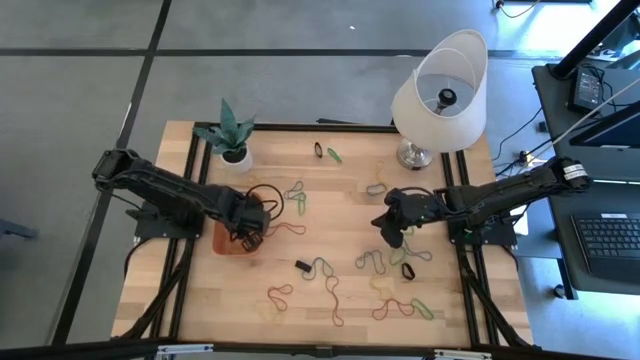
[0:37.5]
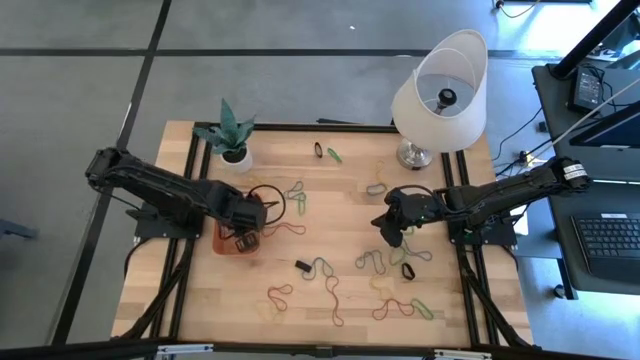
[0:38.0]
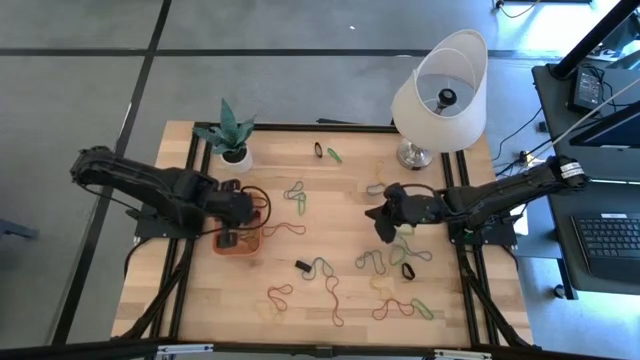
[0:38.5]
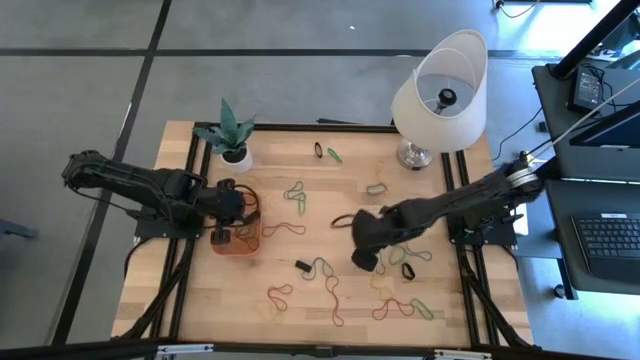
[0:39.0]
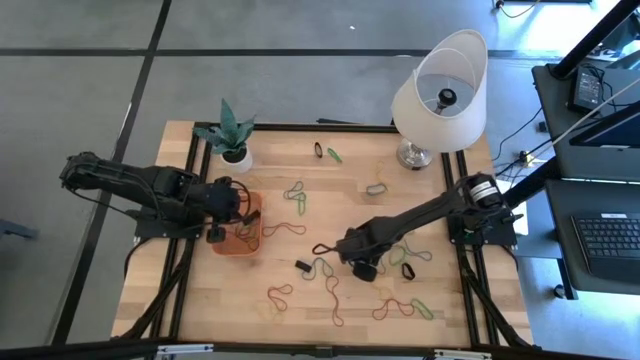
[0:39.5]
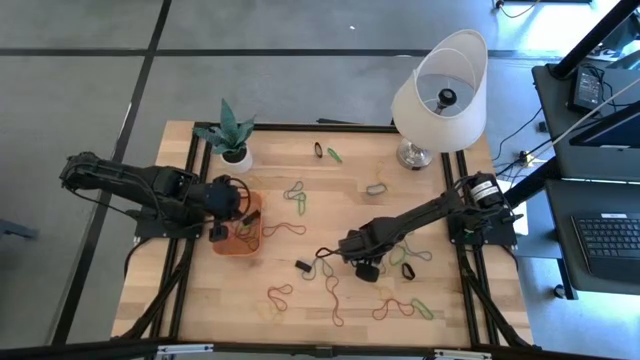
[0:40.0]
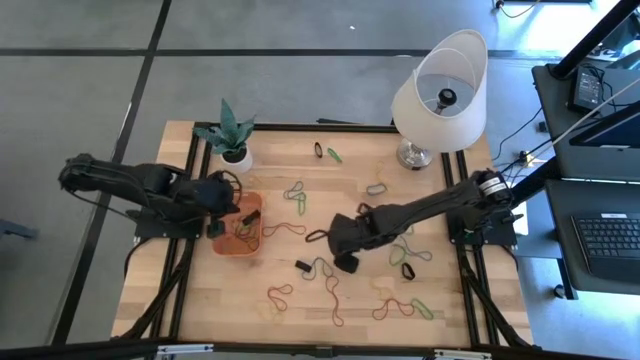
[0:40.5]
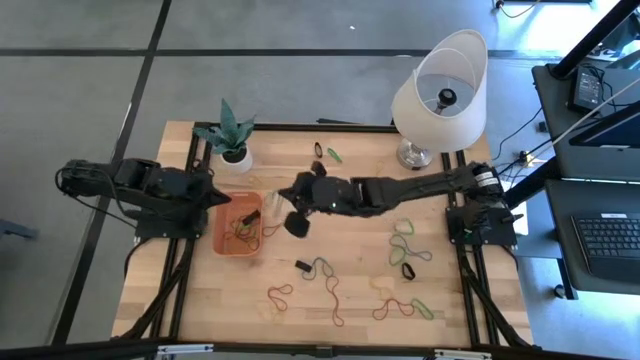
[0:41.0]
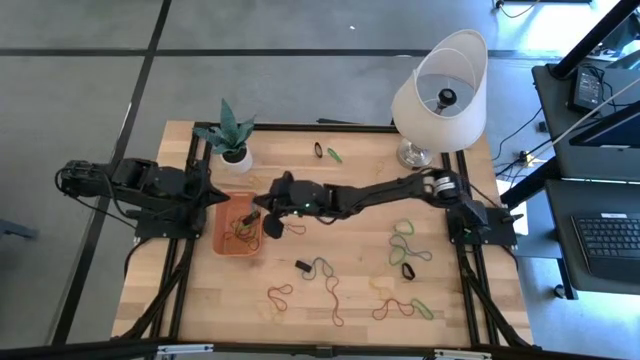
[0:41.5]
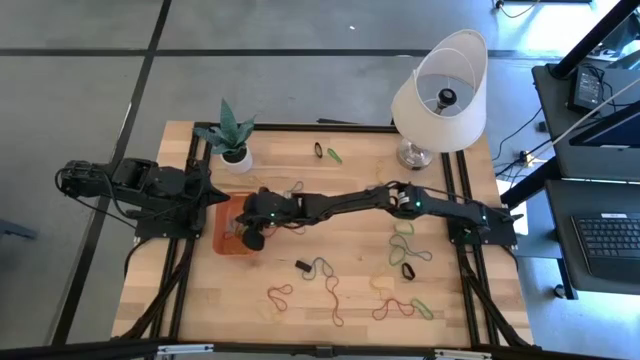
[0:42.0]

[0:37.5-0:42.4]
Task: Pick and place rubber bands into bin
Put the blue rubber band into the orange bin

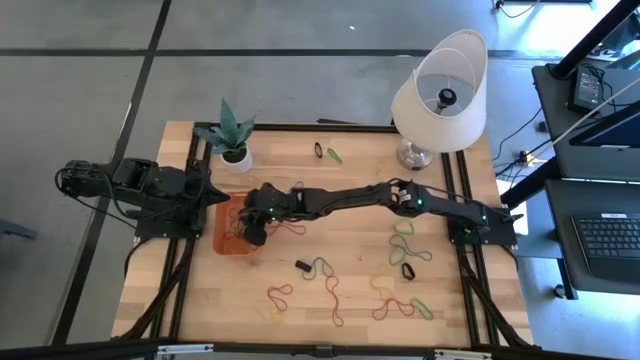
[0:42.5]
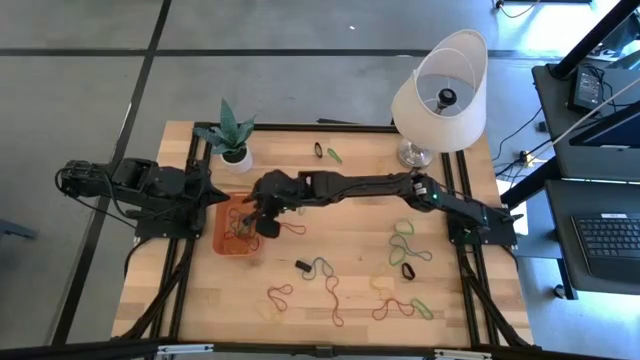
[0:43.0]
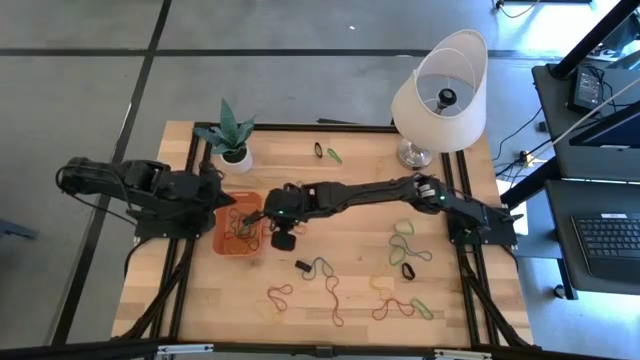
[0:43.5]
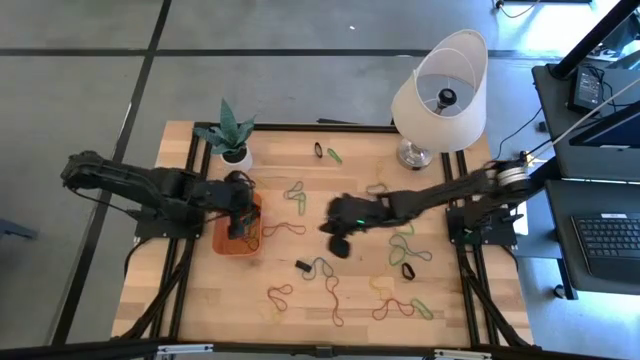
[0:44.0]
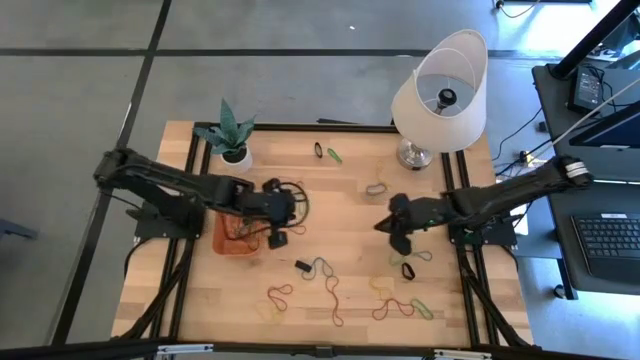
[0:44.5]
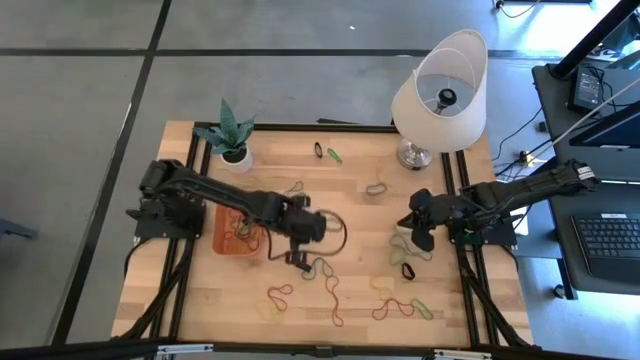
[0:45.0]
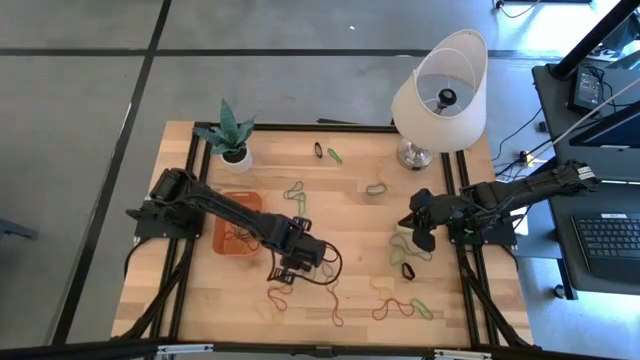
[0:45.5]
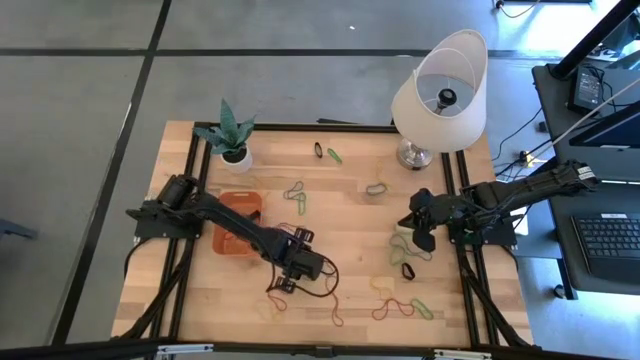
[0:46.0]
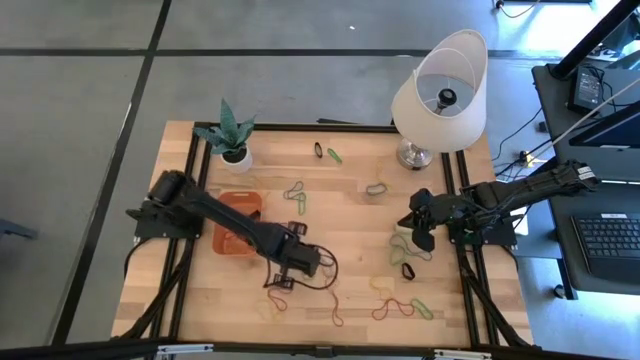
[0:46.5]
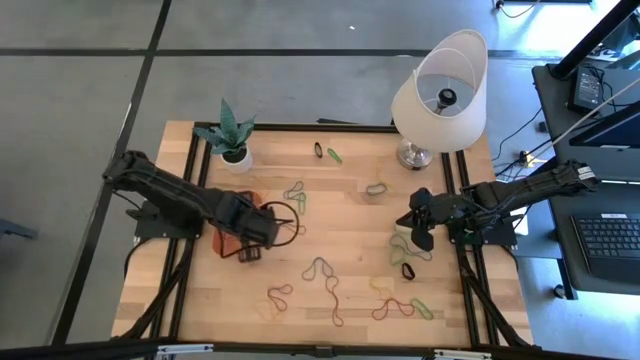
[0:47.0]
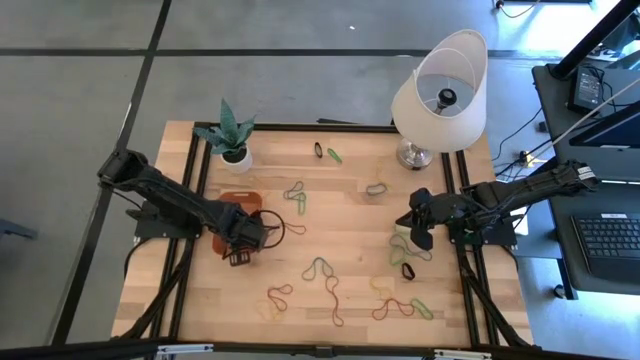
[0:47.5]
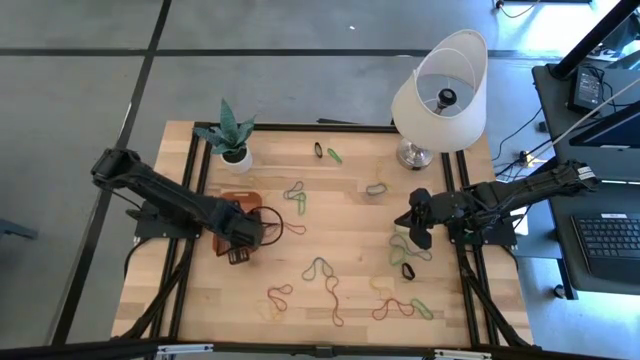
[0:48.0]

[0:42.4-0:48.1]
Put the black rubber band into the orange bin

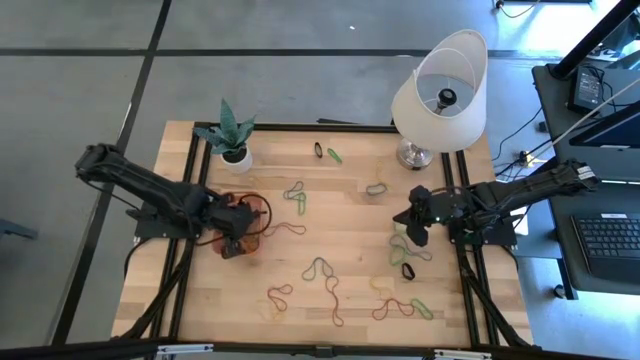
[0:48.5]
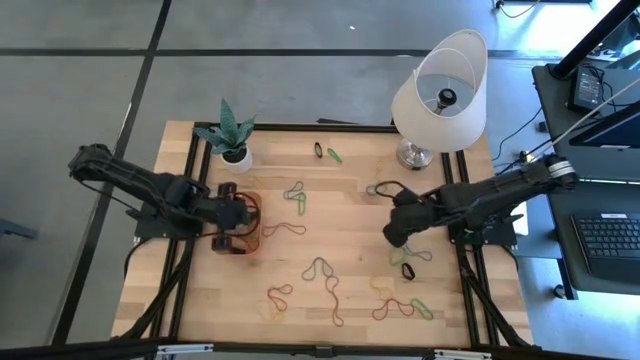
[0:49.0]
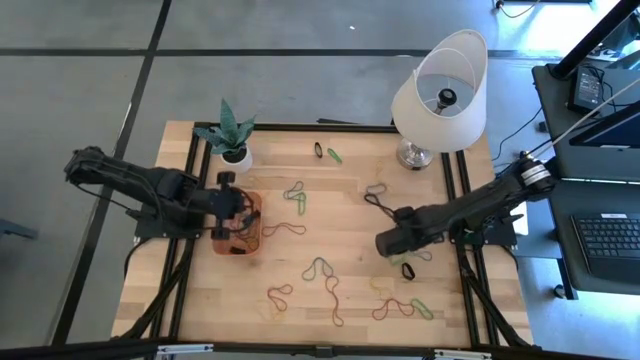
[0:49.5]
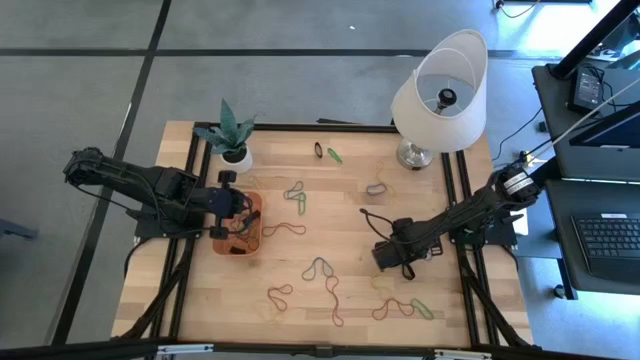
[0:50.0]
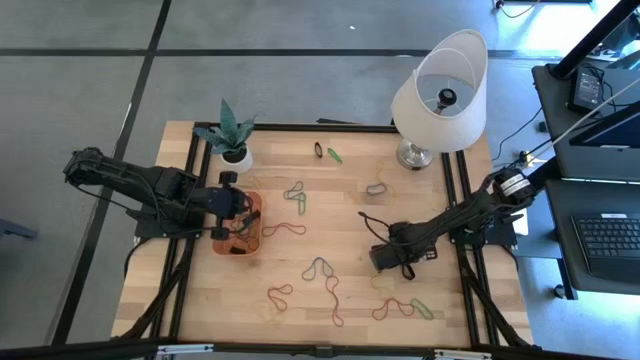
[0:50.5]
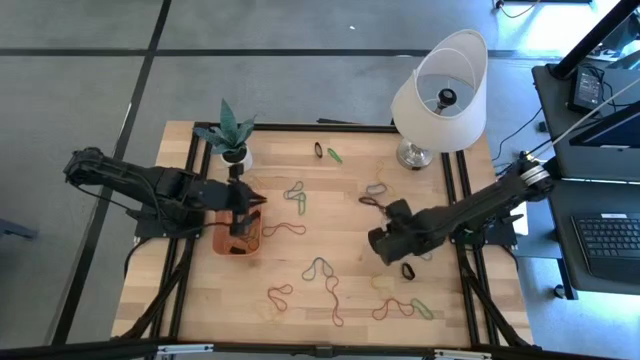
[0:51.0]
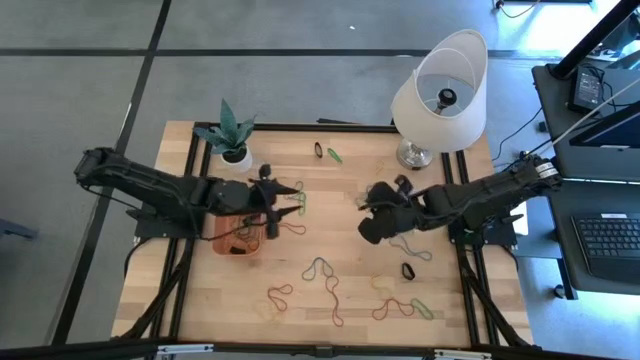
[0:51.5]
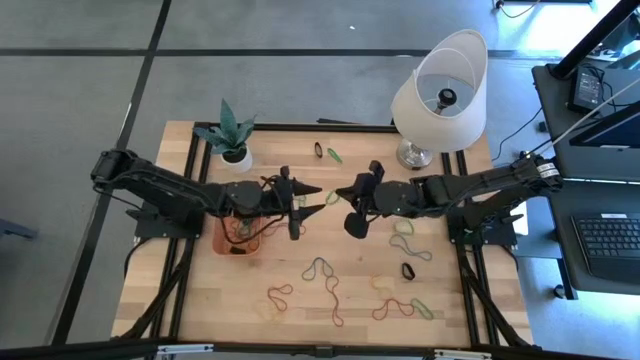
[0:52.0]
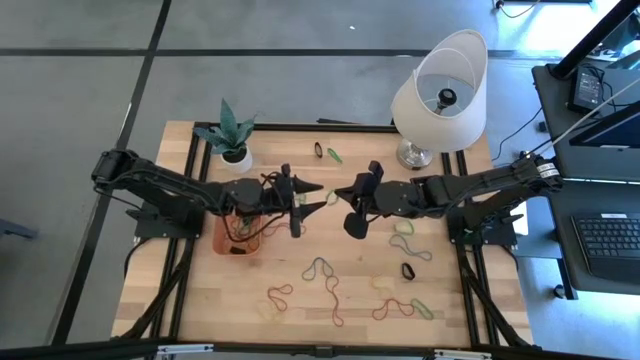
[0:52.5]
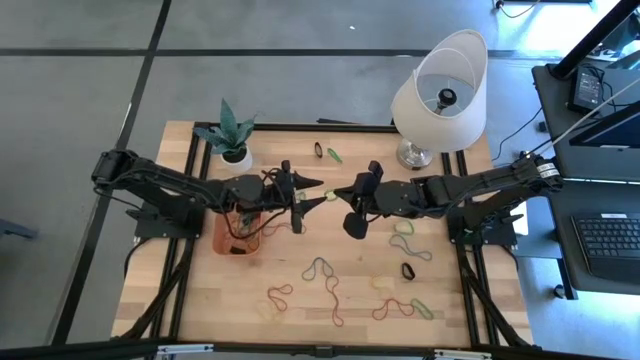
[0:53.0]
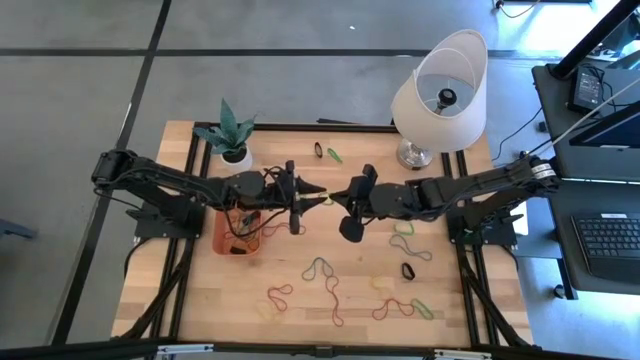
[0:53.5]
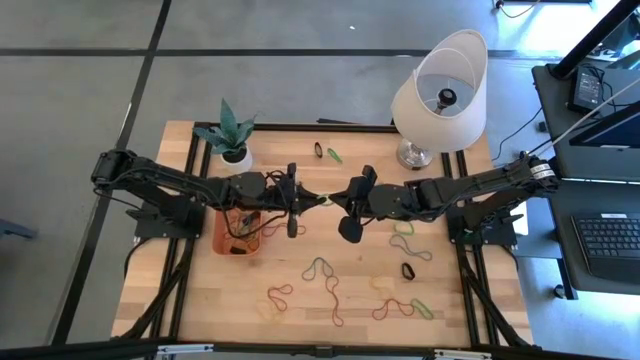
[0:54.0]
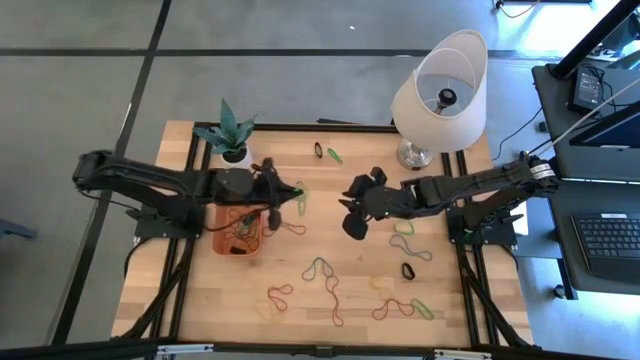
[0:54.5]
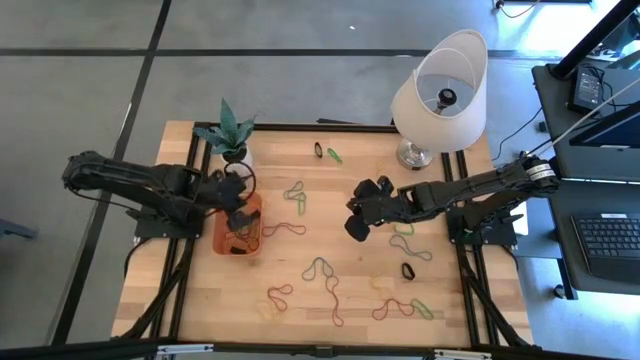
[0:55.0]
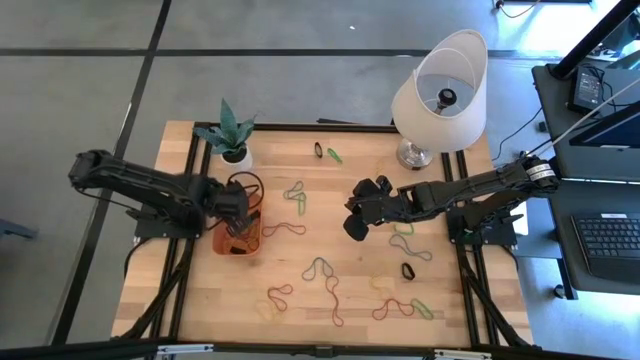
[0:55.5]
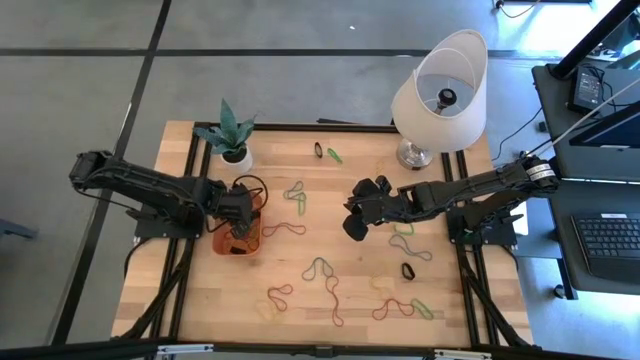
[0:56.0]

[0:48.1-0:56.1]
Put the green rubber band into the orange bin

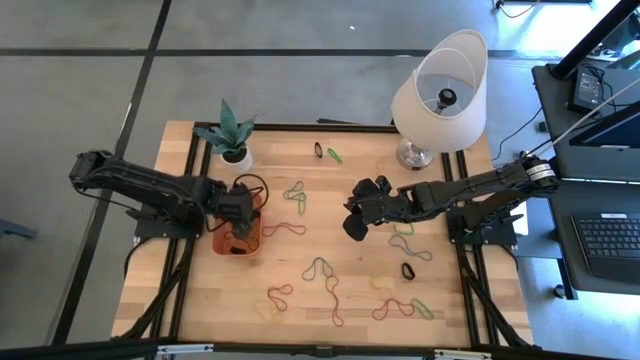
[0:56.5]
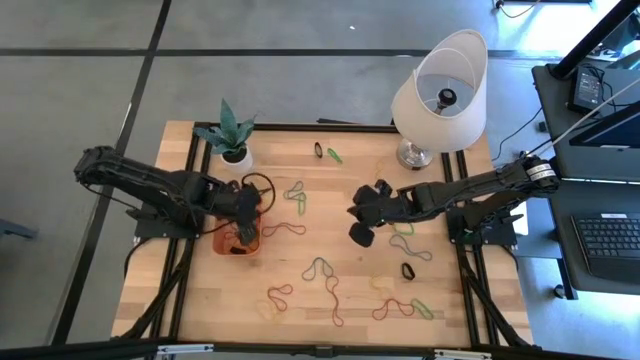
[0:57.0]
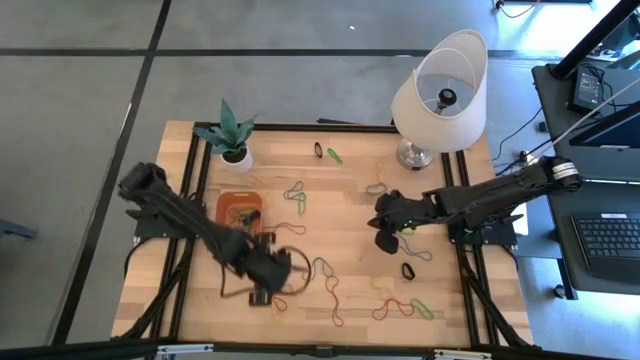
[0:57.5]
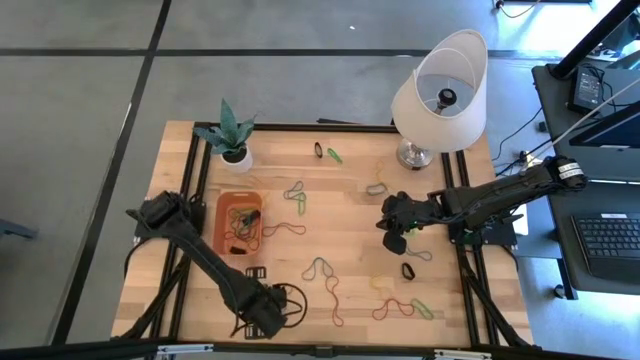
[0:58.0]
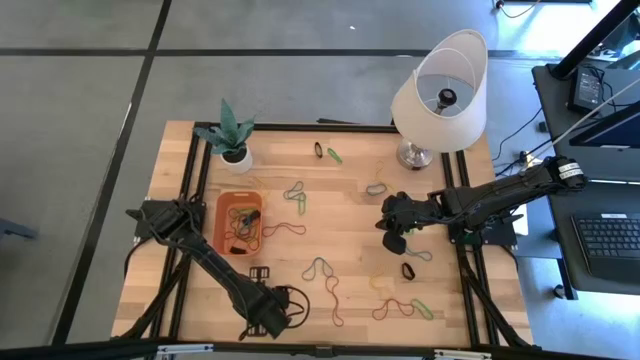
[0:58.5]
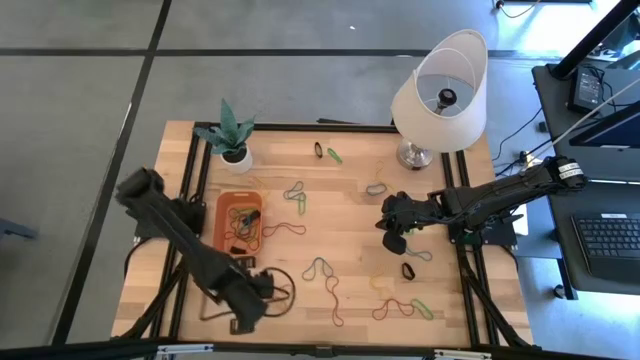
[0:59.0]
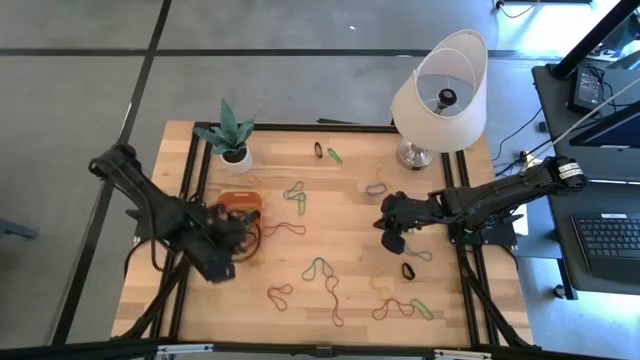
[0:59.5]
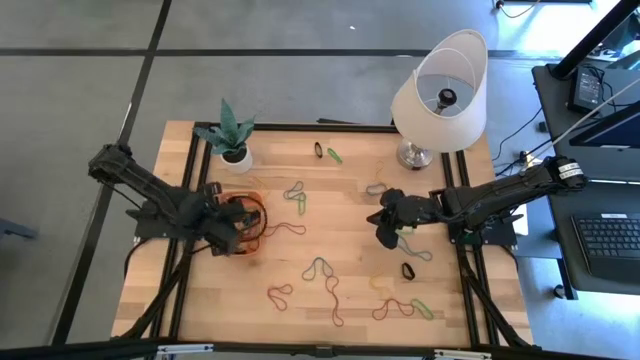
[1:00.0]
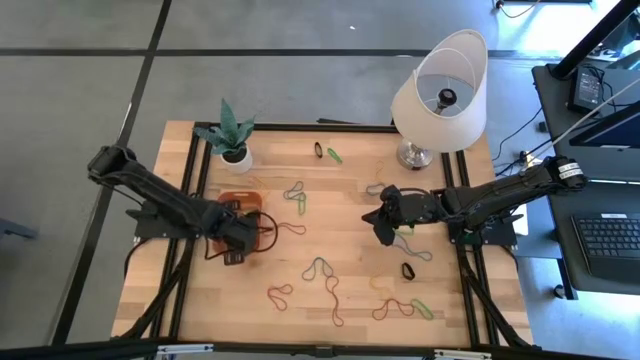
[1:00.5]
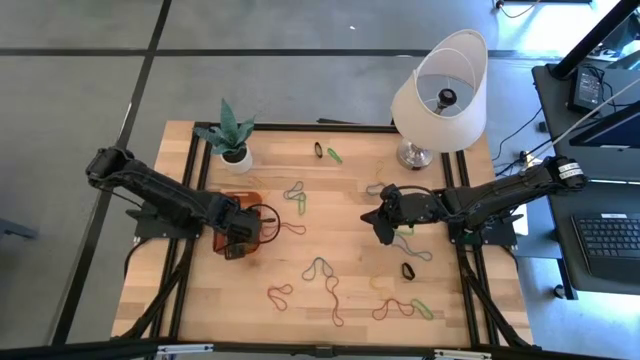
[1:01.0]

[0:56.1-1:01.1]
Put the yellow rubber band into the orange bin
